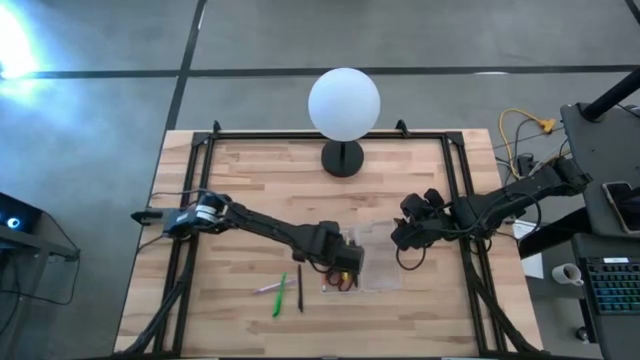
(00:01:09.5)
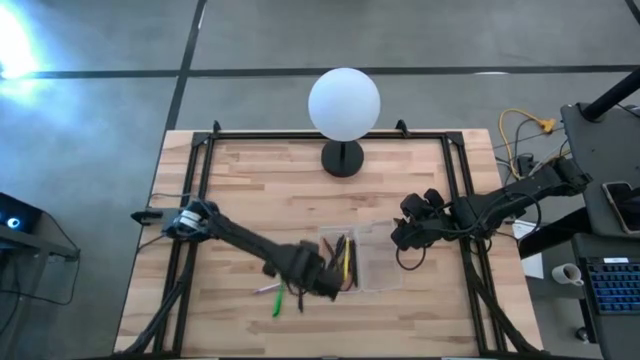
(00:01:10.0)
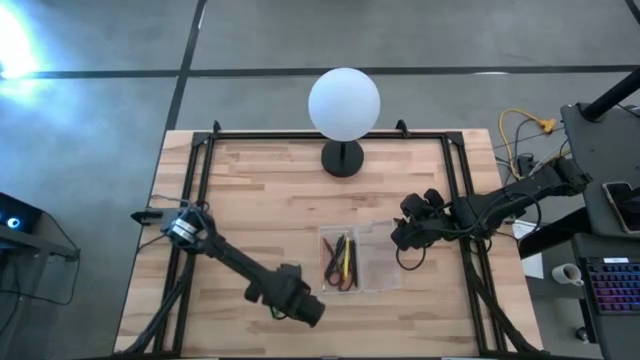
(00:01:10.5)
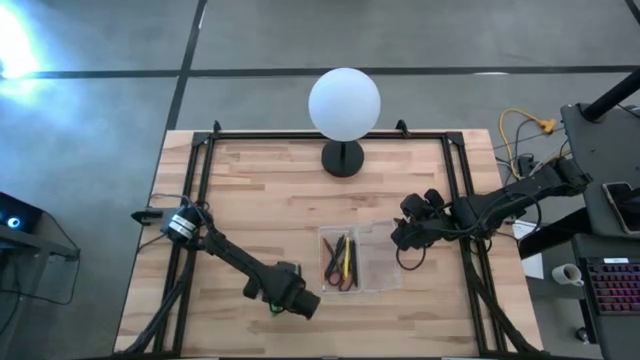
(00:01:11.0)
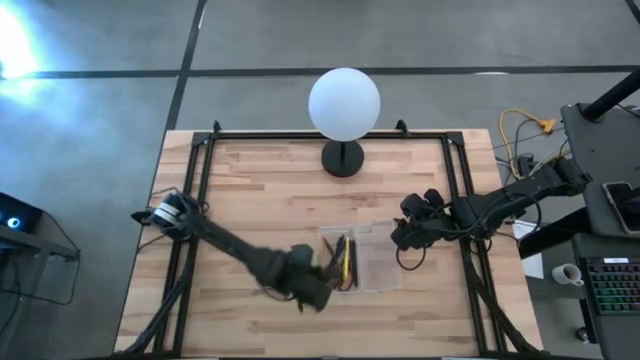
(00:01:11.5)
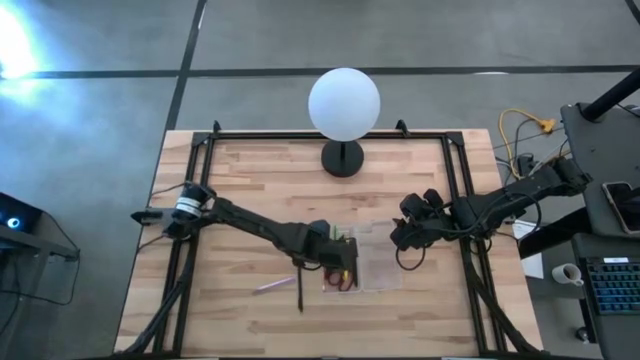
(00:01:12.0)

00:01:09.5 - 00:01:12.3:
Task: Pick & place school supplies into a supply box
Put the green pen into the transparent supply box

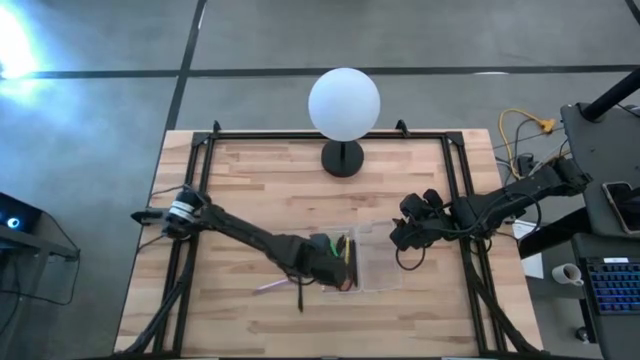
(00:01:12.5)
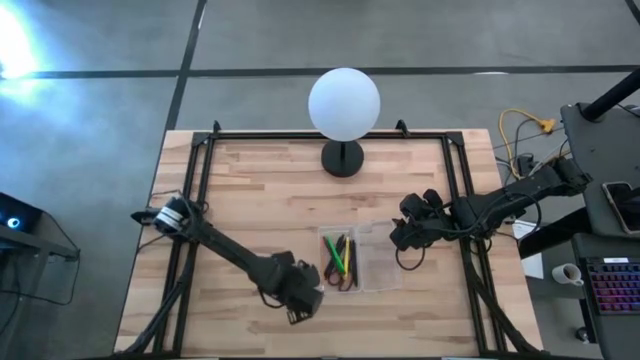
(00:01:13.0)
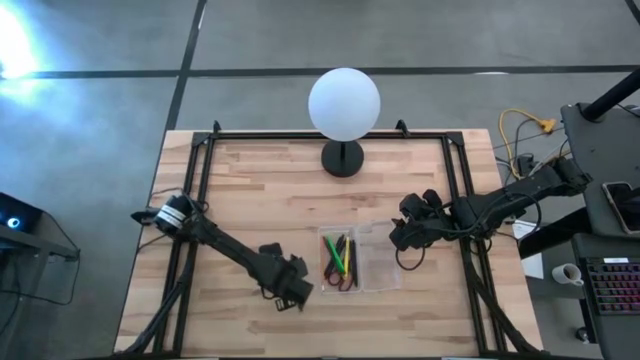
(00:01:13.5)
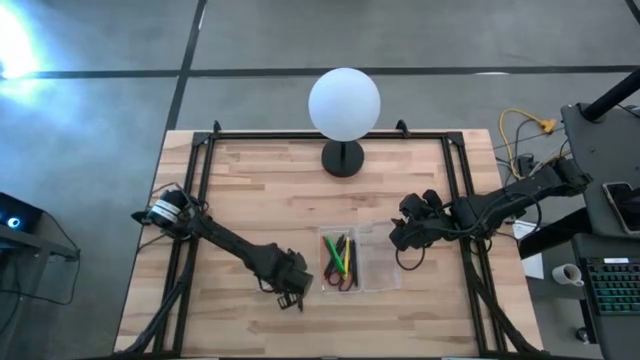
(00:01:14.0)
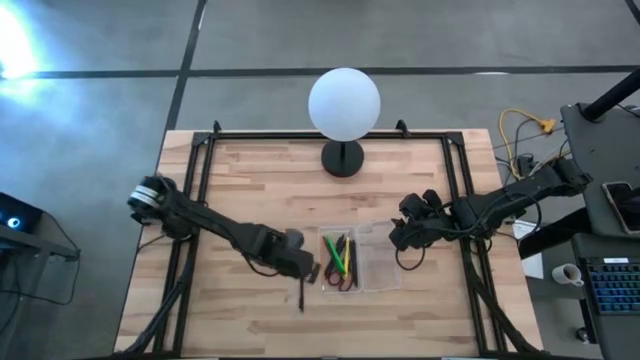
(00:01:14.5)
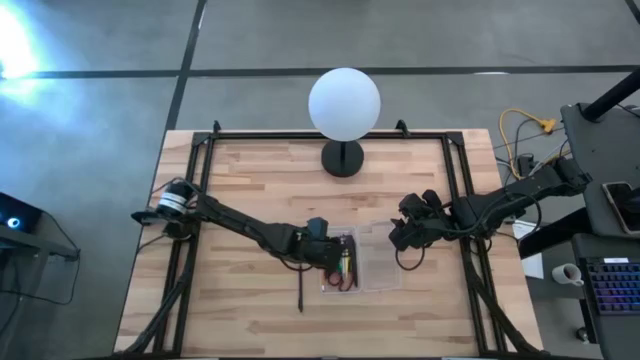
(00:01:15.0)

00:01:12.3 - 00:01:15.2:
Put the purple pen into the transparent supply box

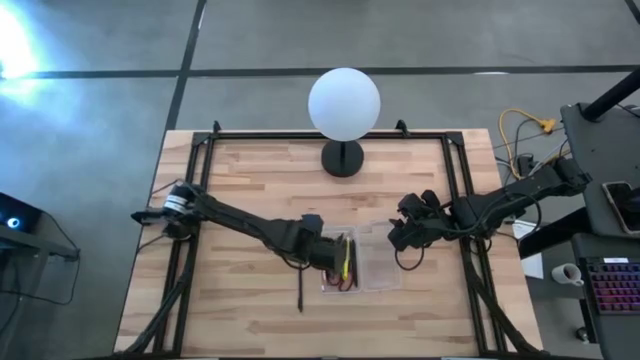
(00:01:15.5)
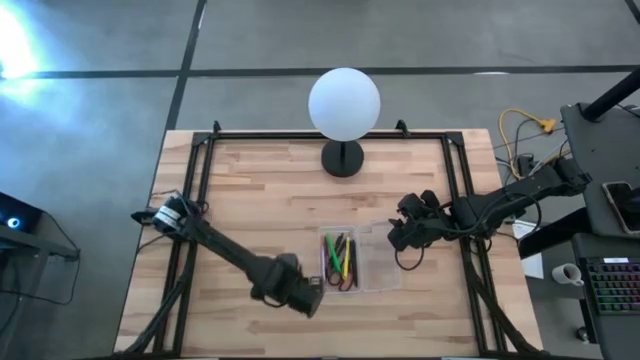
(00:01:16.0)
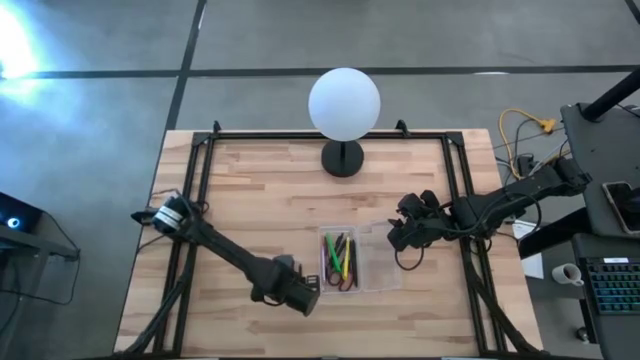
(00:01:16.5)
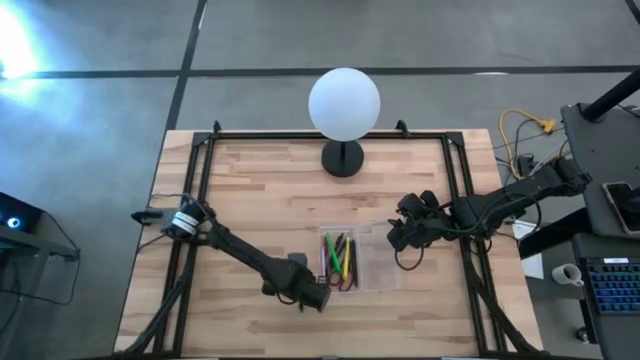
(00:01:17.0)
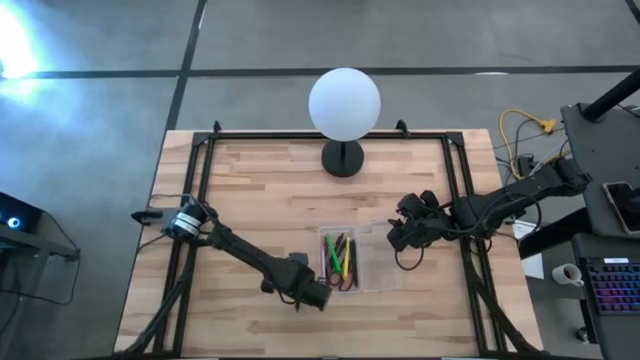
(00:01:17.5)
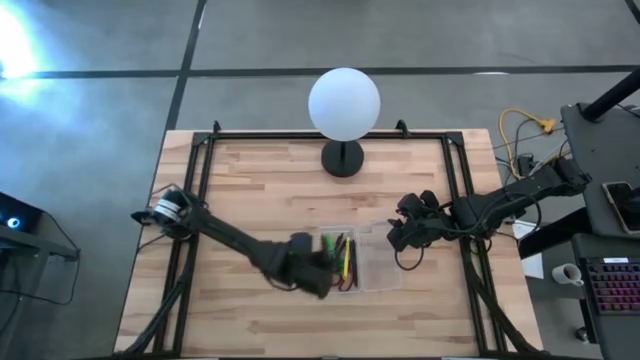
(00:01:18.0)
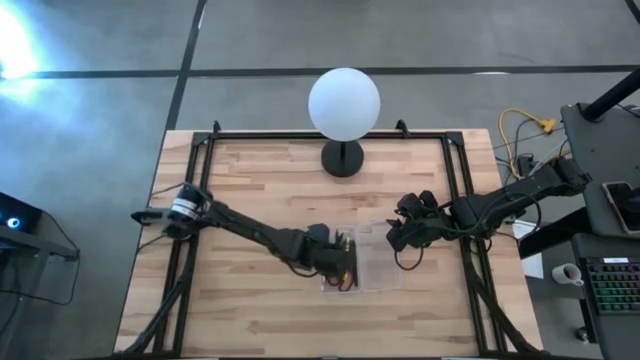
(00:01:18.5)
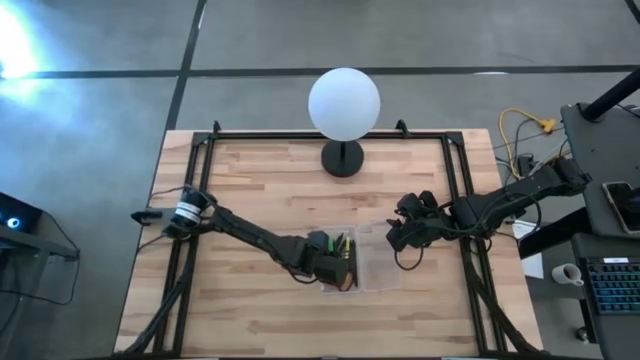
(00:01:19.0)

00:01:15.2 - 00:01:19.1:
Put the black pen into the transparent supply box

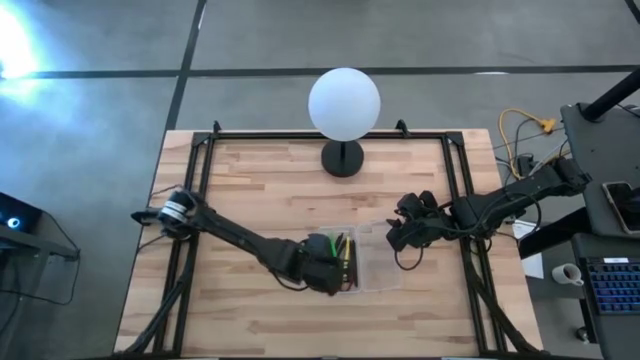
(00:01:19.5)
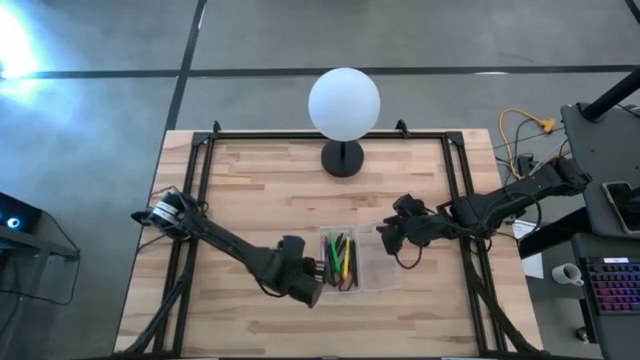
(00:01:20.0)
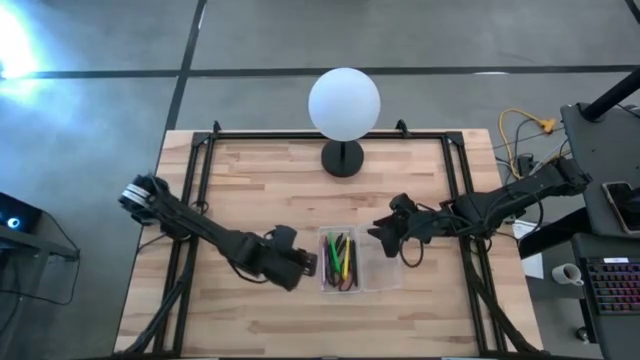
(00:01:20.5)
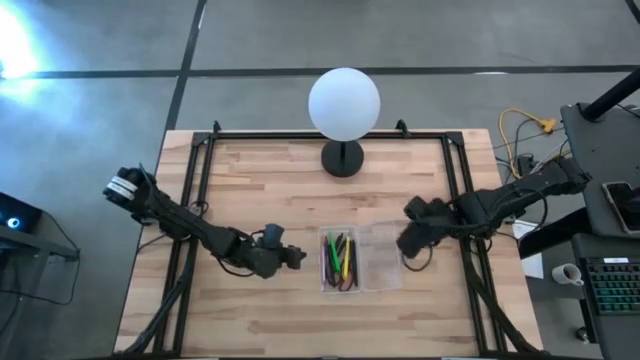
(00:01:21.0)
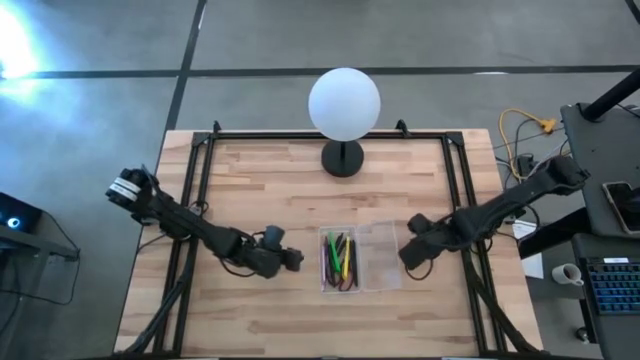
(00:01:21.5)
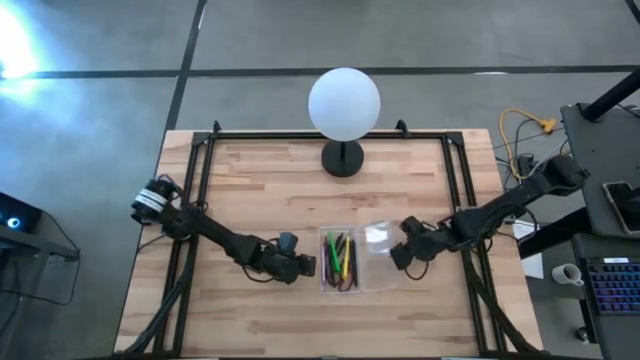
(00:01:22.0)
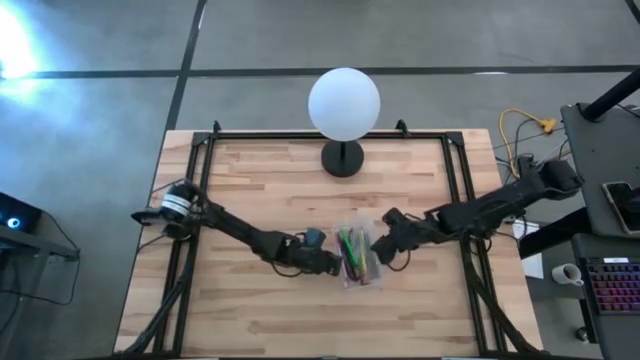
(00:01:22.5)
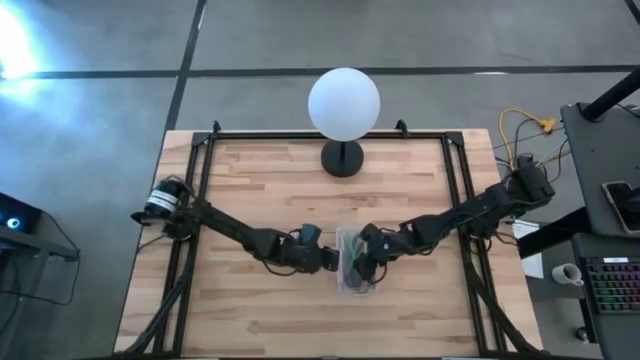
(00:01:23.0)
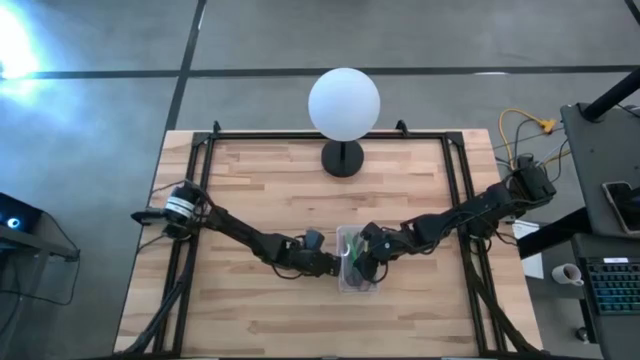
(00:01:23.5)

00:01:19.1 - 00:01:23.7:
Close the transparent supply box

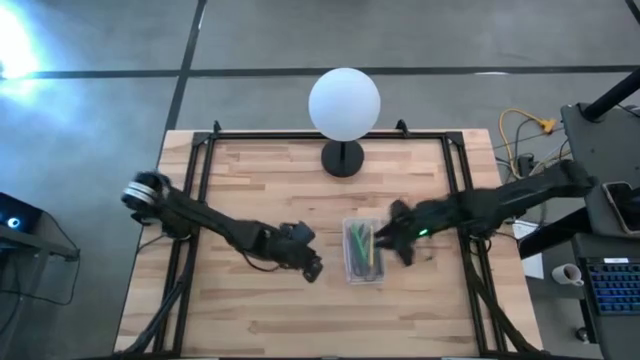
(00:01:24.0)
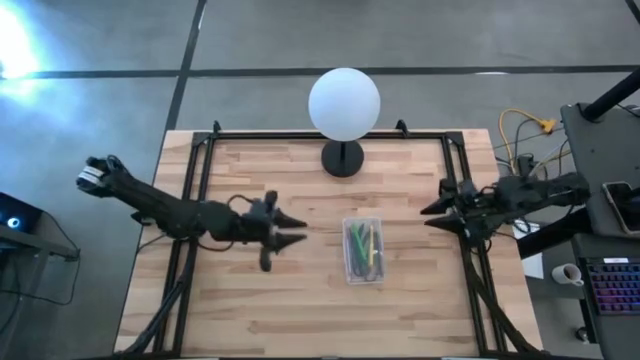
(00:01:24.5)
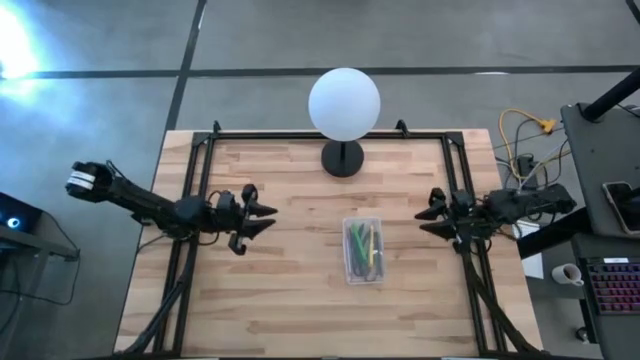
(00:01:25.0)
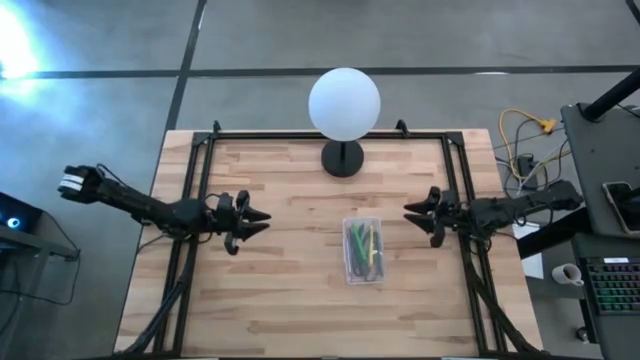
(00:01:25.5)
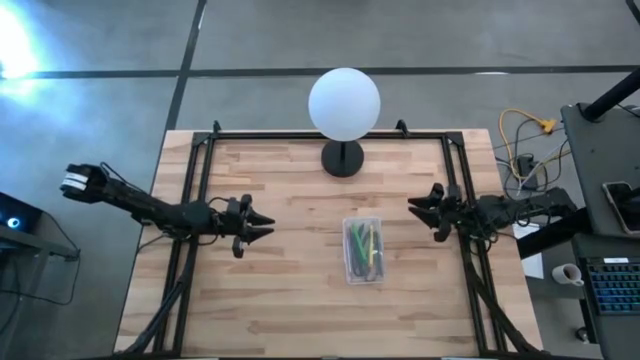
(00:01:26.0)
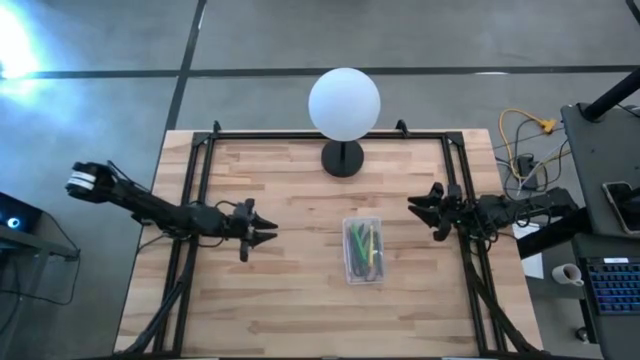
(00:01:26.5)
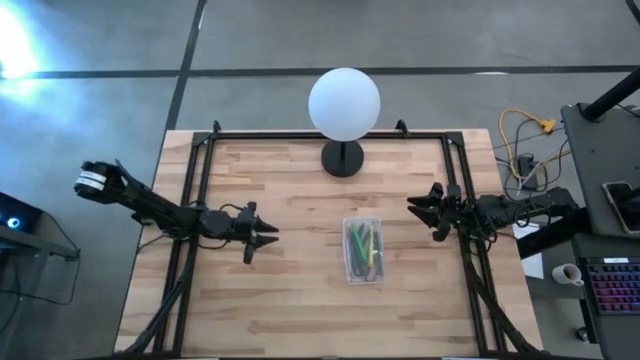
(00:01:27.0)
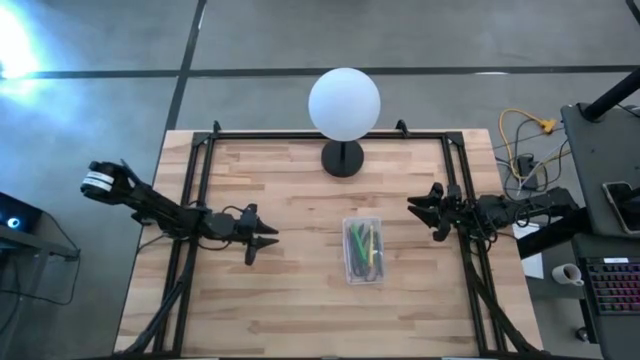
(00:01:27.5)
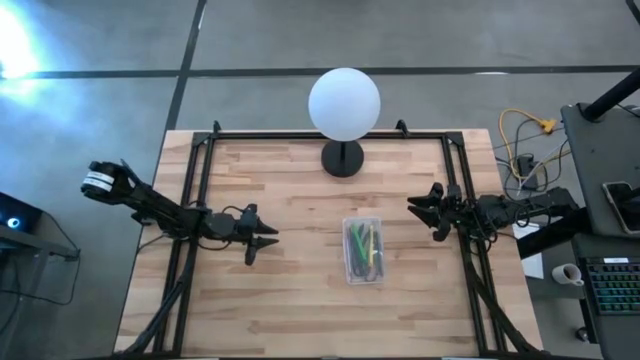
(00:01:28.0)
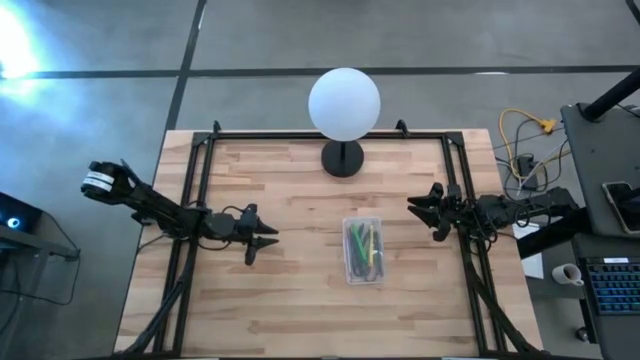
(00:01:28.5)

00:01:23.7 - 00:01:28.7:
Return to Home Position

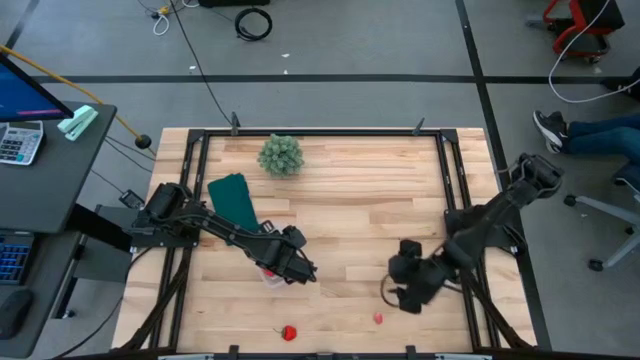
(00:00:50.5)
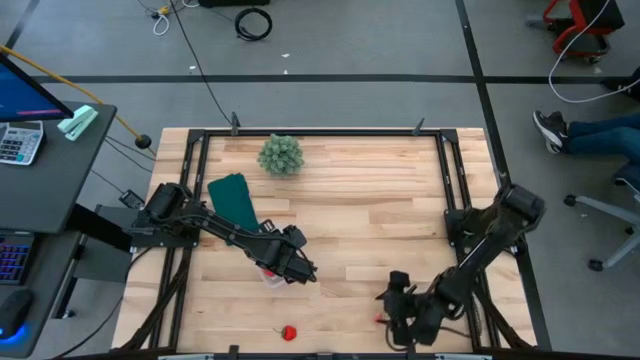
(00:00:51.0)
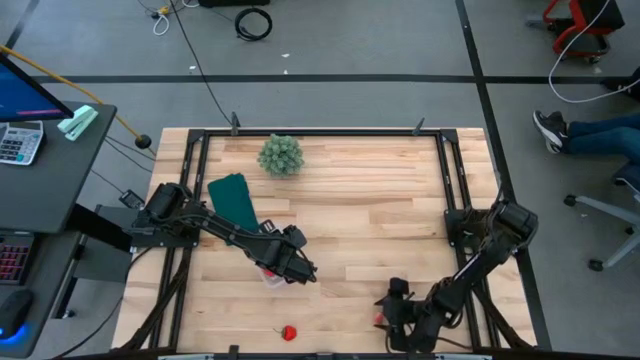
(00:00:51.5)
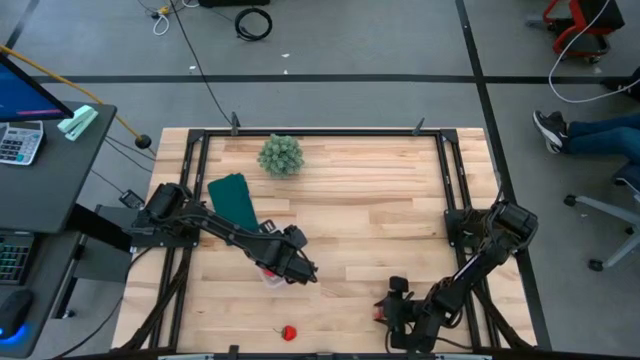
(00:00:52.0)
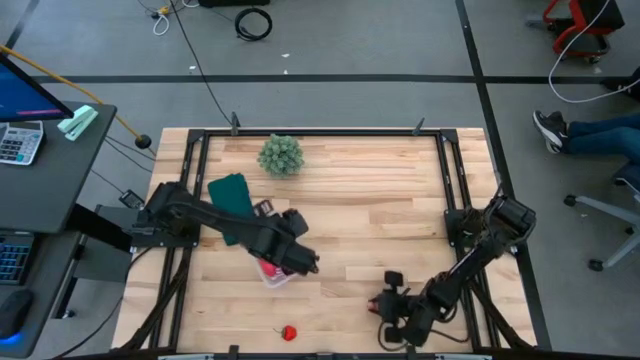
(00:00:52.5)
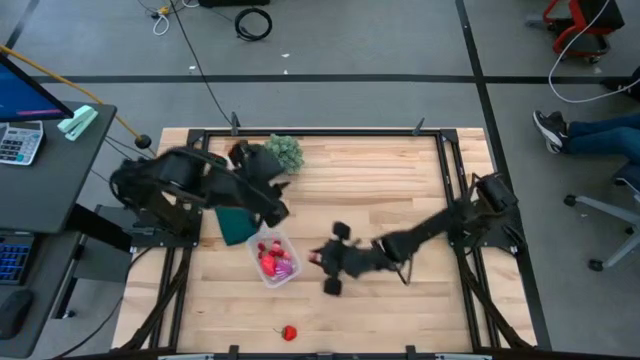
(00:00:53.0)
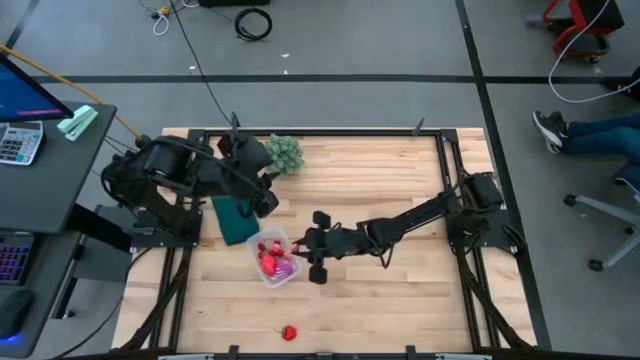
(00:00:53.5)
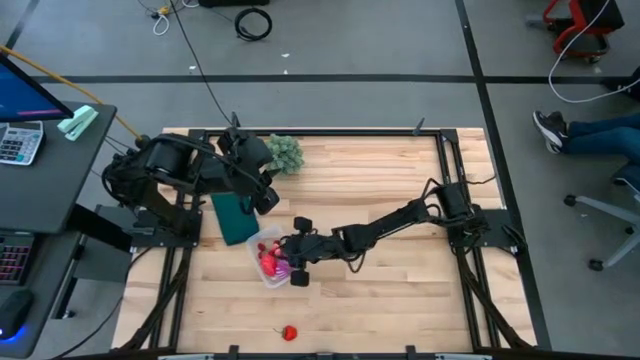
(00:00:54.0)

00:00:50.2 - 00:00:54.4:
Task: Pick and placing Produce into tupperware
Put the pink peach into the transparent bin
